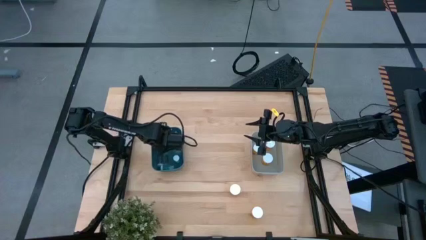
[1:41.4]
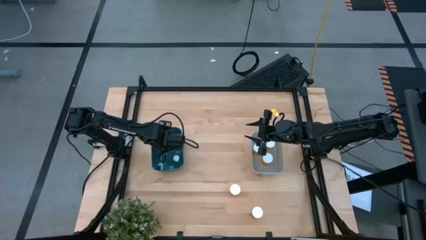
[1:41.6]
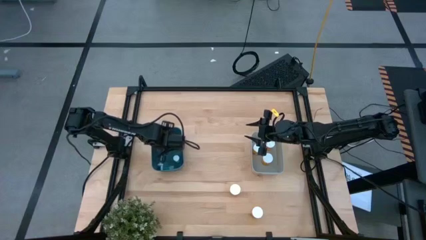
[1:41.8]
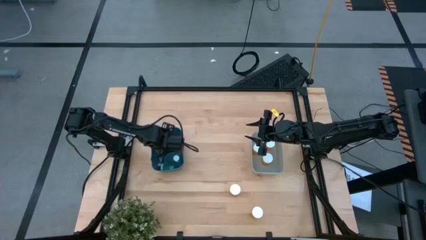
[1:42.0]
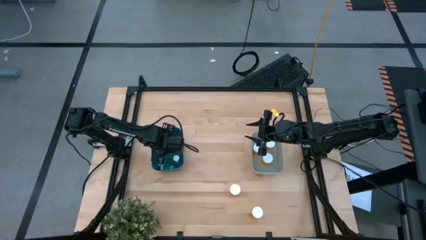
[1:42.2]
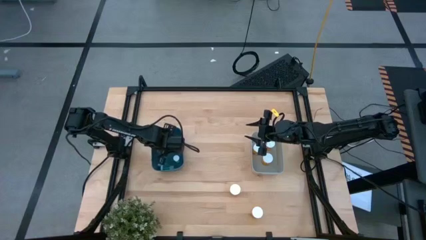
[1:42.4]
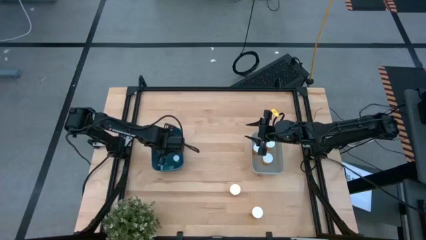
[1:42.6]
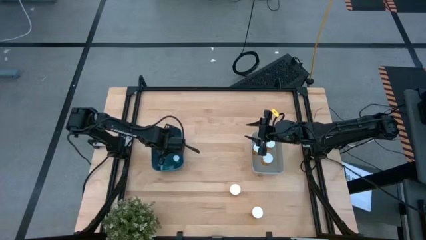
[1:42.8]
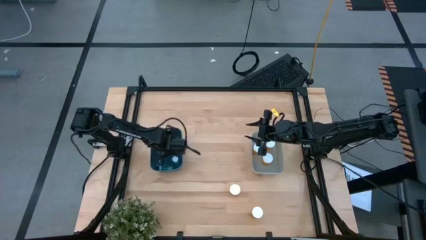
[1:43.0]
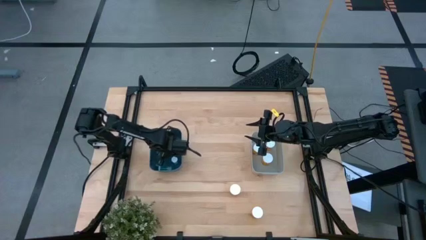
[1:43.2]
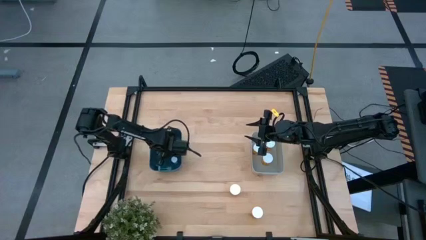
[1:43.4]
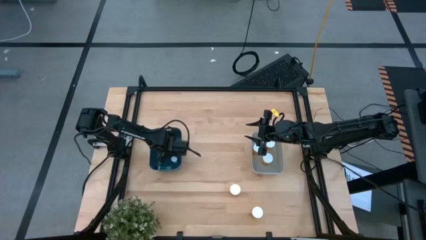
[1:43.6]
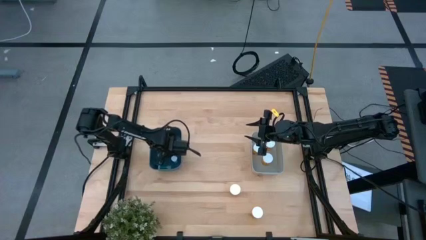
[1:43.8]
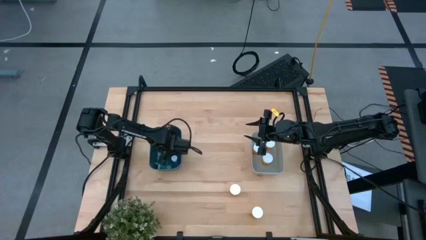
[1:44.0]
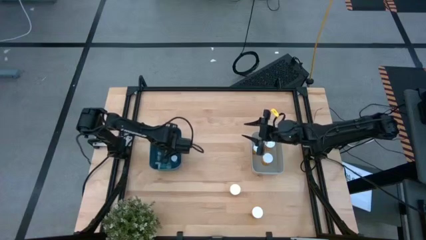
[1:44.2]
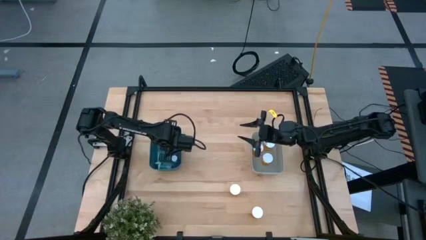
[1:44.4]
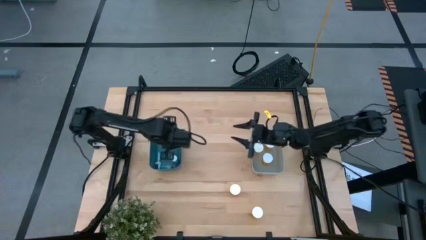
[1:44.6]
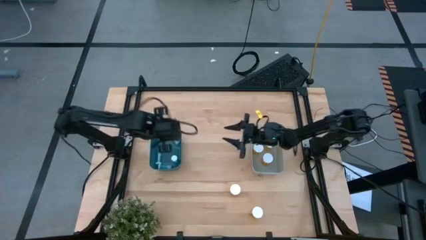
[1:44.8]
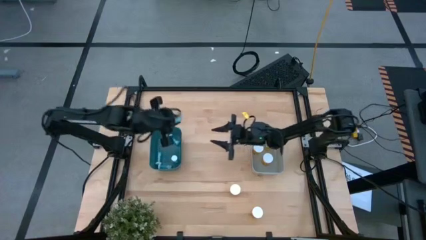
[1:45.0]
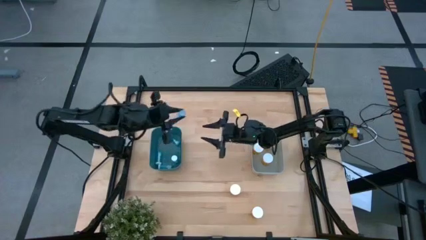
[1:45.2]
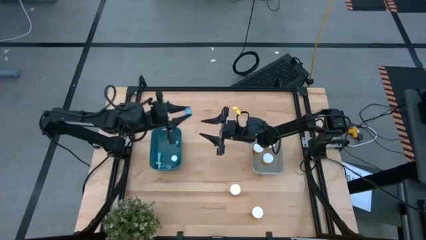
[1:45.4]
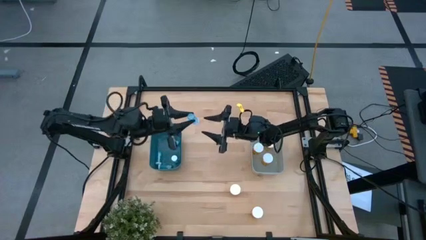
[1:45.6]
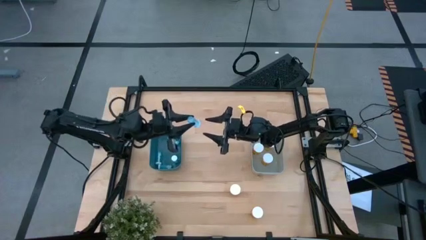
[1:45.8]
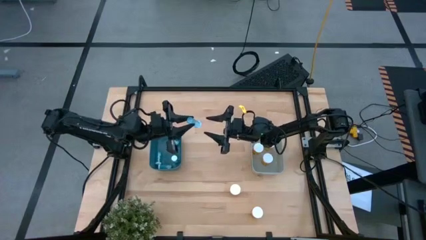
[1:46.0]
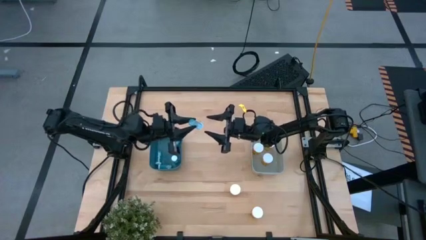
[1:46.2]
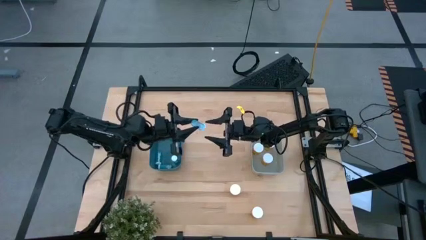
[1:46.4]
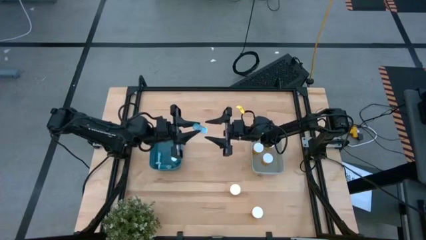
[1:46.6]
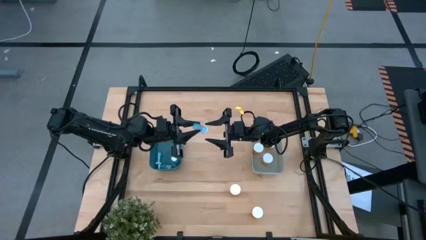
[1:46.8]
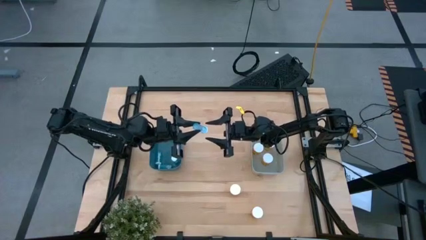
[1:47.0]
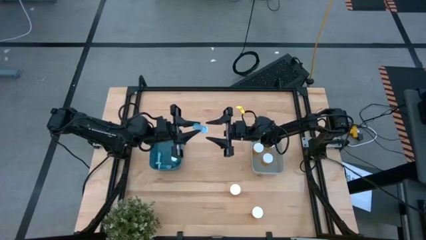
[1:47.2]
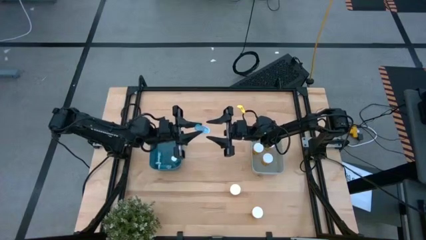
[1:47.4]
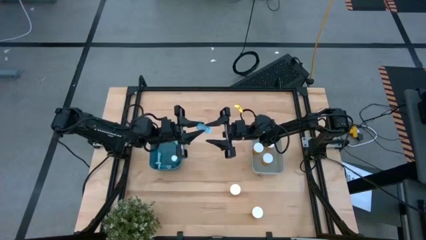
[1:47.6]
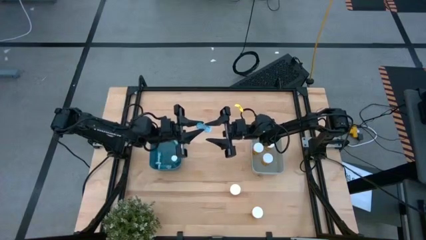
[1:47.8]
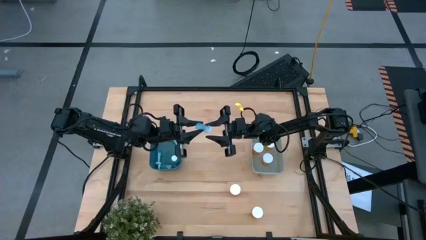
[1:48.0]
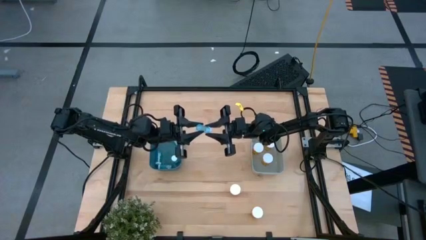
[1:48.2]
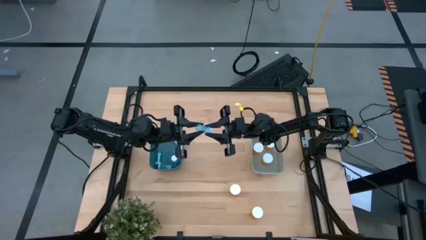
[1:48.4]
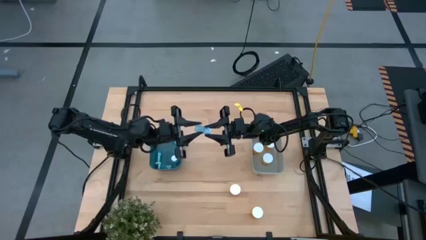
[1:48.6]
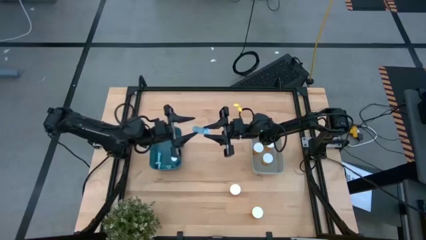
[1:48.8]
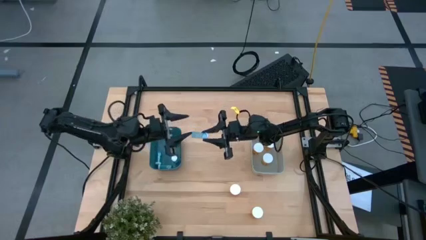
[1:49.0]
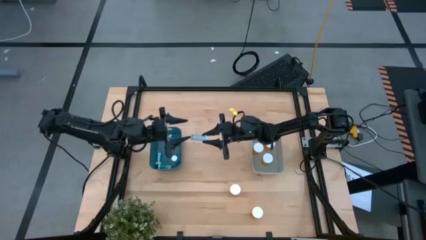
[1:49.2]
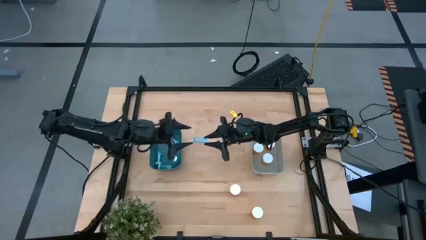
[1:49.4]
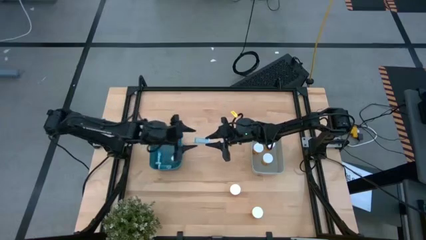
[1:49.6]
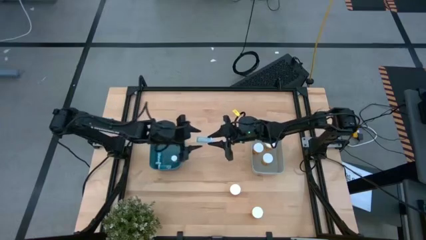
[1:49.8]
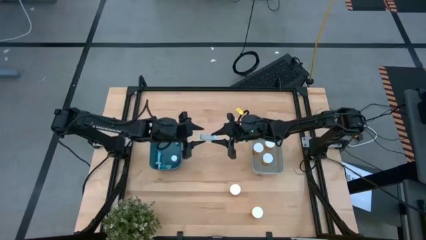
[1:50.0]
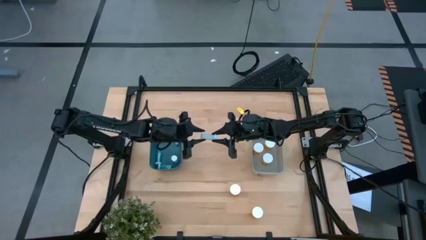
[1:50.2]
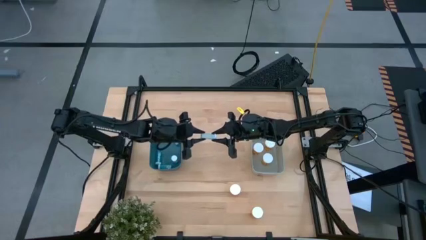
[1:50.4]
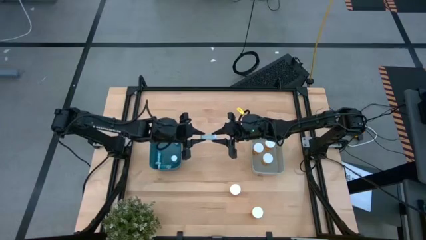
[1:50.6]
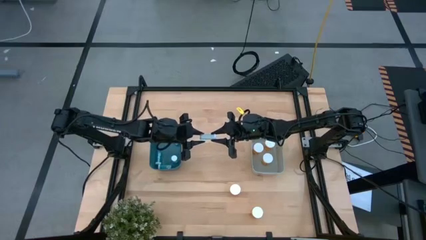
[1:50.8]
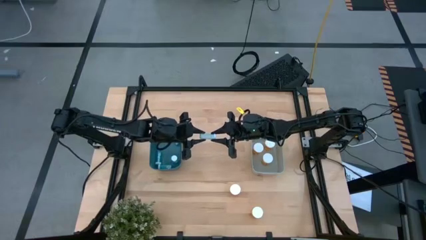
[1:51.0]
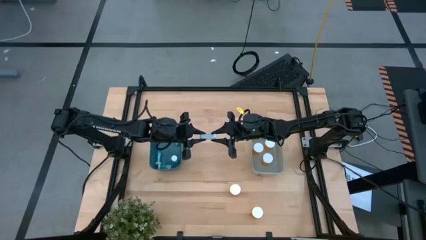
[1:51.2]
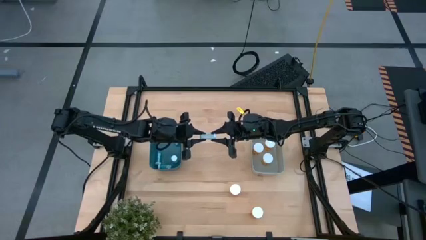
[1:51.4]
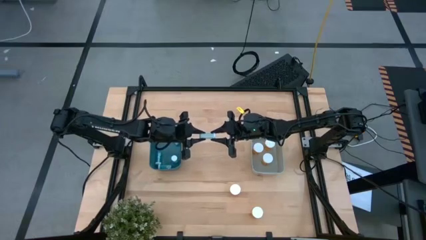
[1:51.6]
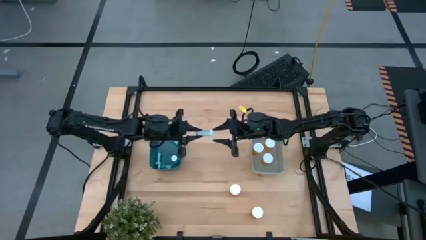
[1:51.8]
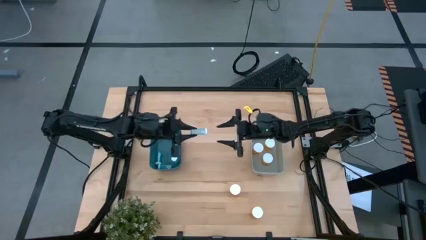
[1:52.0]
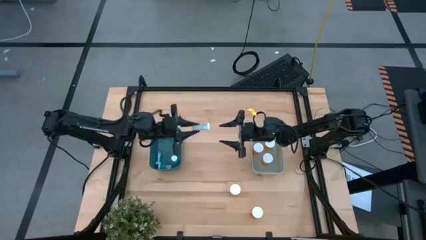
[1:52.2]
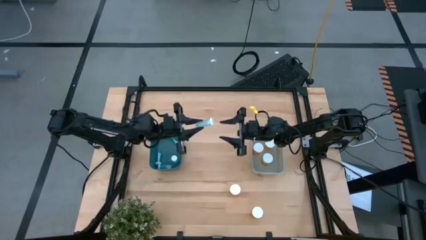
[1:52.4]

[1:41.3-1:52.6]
Task: Pick and place medicine bottles into bin by pill shape (circle, oval)
Adjust the blue pill bottle

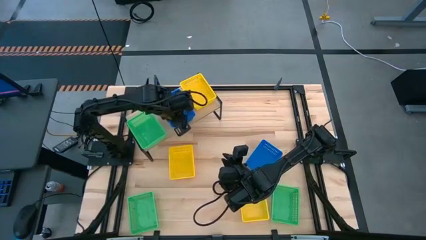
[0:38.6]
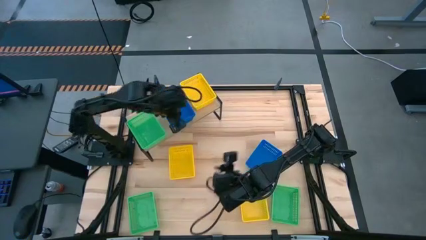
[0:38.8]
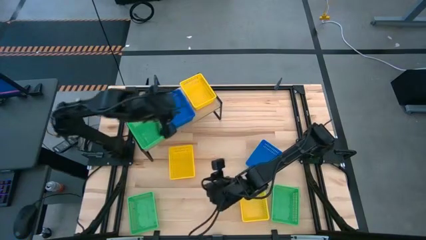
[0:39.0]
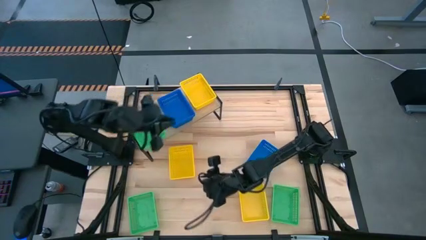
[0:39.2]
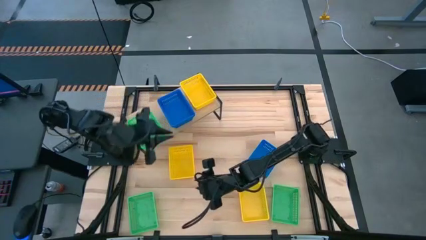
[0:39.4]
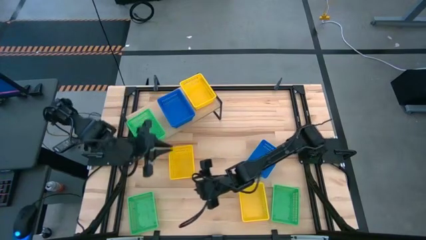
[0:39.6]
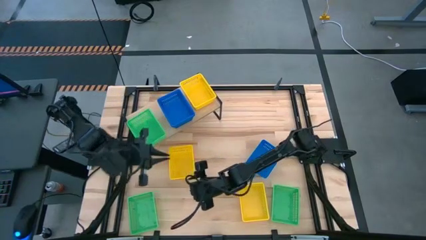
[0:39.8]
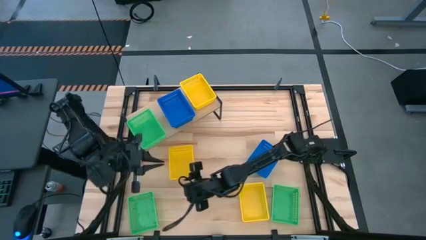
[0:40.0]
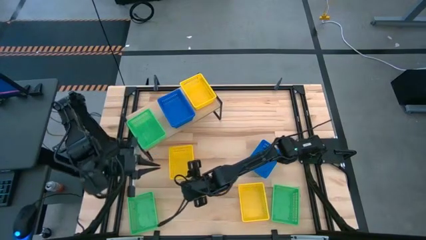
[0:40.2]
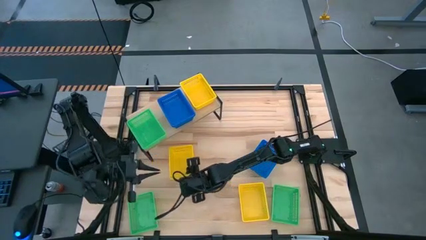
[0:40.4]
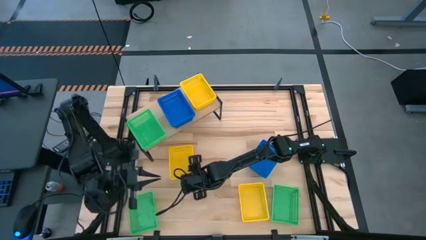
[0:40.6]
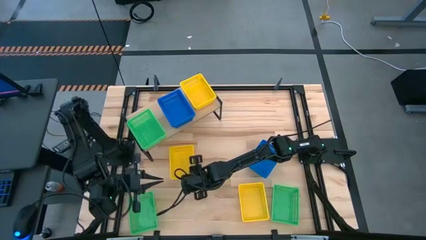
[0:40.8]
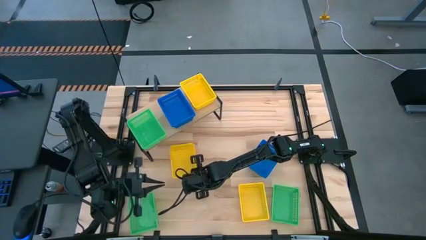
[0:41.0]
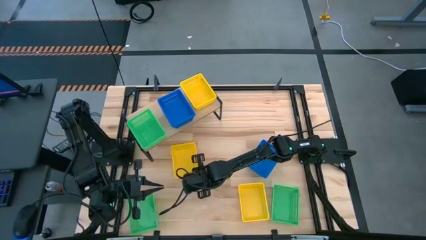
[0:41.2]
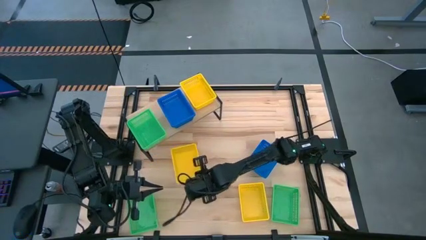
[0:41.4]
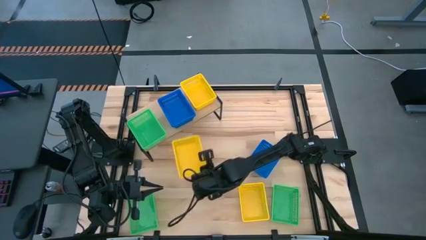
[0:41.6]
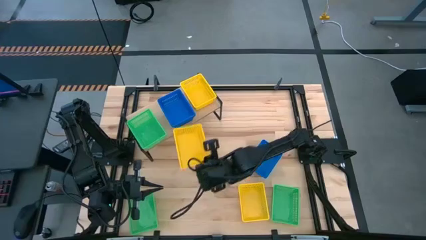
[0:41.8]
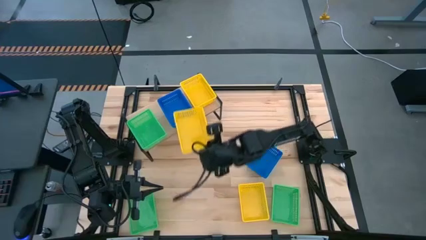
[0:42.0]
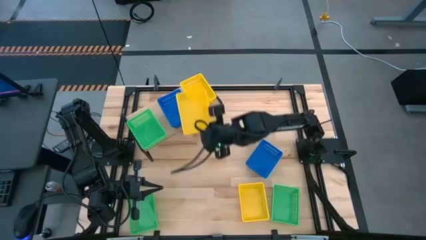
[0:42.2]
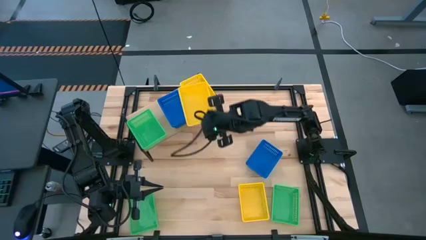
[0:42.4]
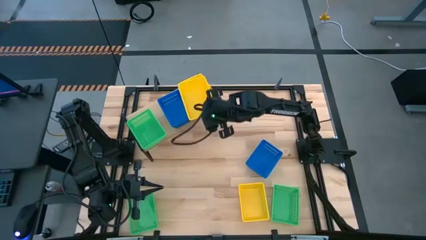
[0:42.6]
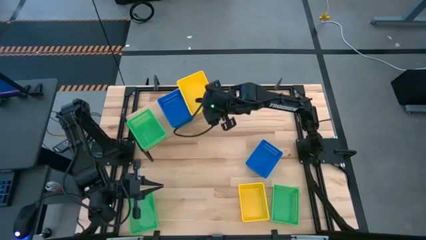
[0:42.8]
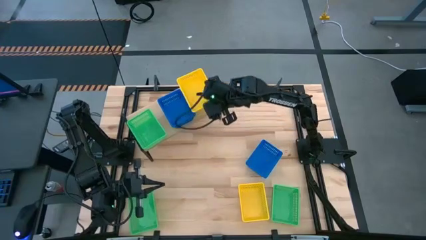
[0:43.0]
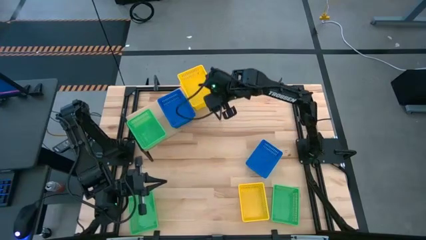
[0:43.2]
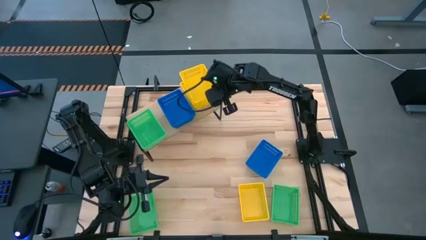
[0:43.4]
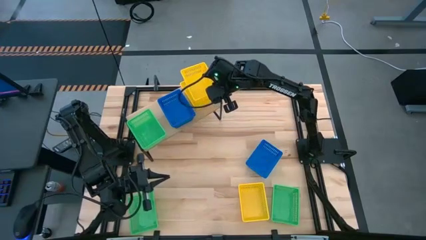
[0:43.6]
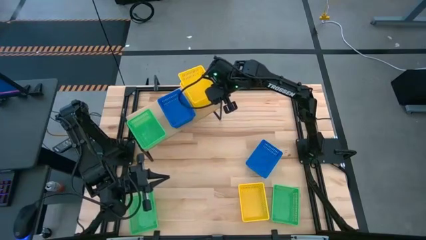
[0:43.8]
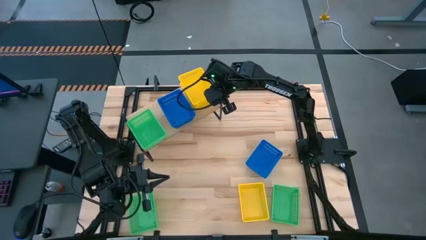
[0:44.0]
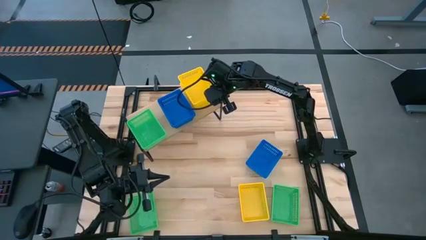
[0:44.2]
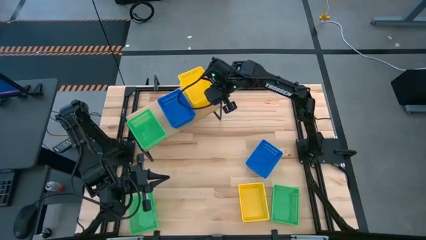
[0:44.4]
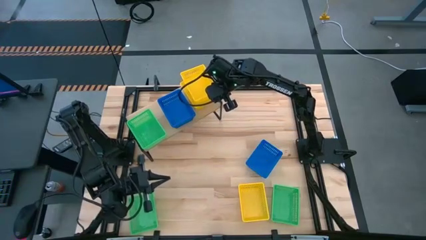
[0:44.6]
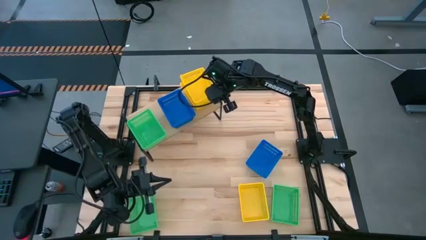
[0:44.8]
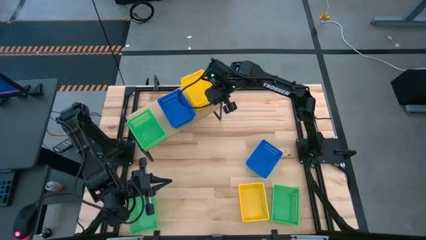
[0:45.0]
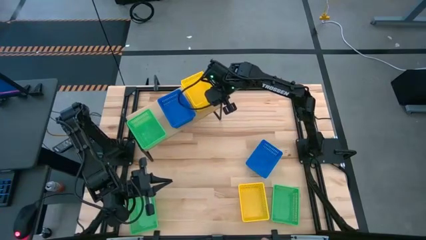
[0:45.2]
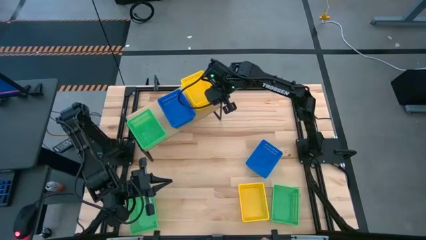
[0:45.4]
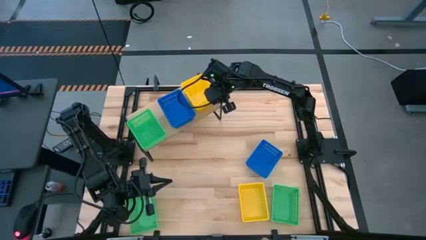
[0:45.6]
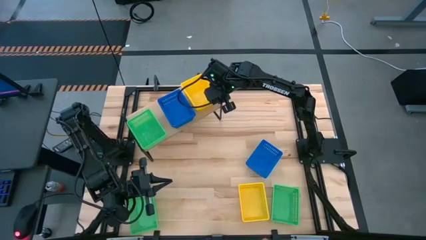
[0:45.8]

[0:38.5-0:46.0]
Task: Stack baskets on shelf by color
Stack the top yellow basket on top of the yellow basket on the shelf
